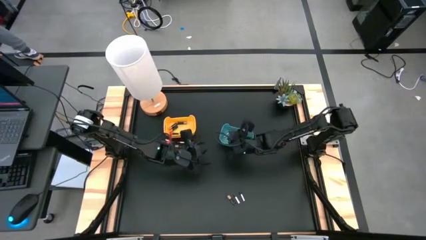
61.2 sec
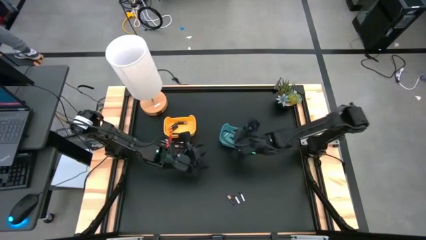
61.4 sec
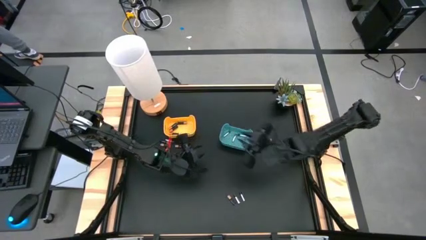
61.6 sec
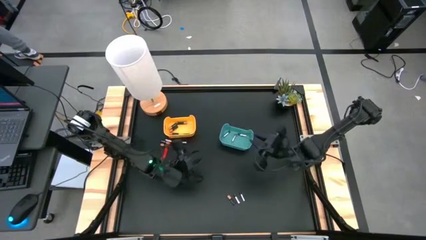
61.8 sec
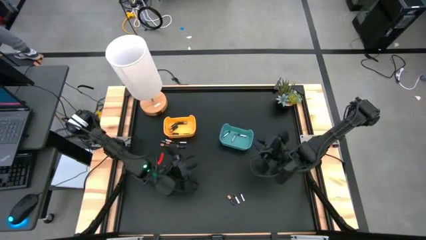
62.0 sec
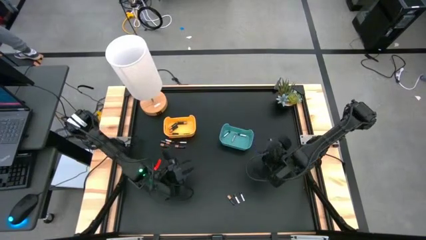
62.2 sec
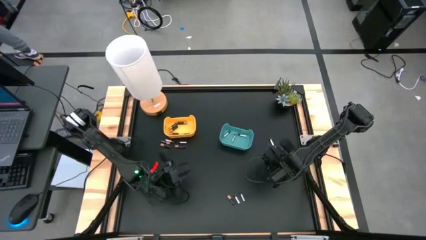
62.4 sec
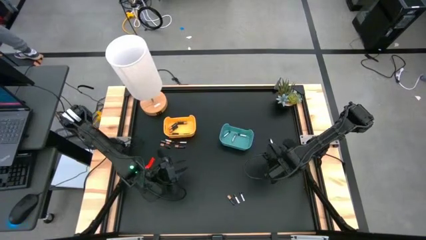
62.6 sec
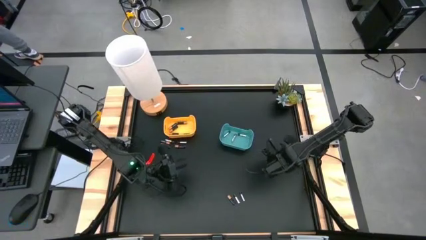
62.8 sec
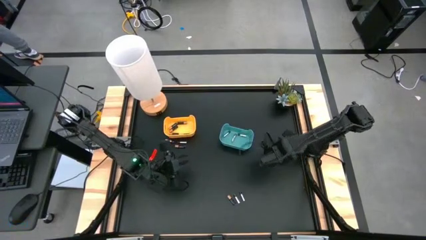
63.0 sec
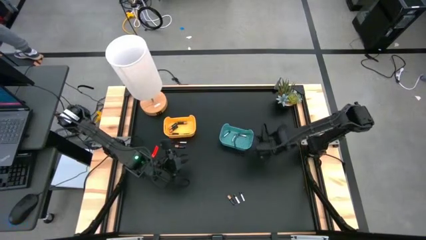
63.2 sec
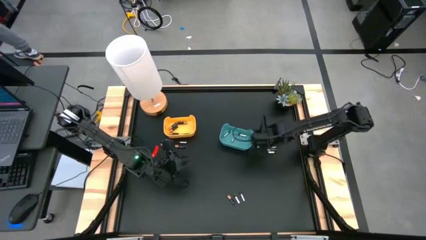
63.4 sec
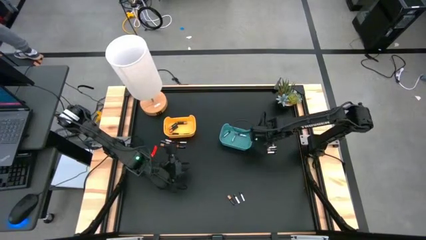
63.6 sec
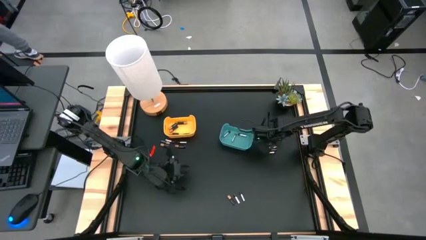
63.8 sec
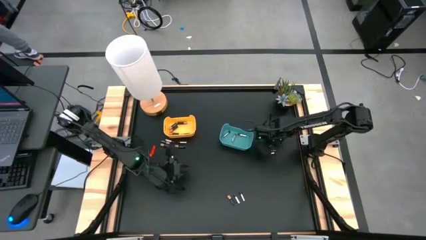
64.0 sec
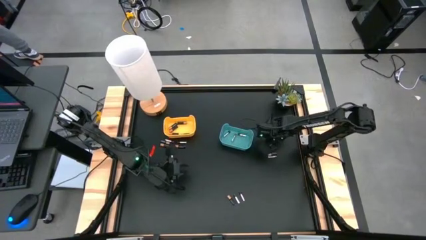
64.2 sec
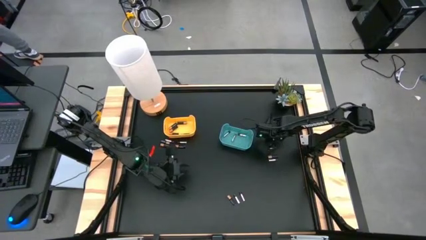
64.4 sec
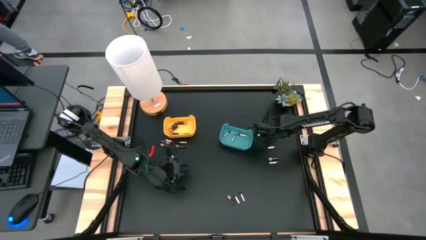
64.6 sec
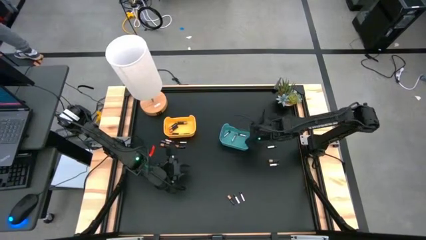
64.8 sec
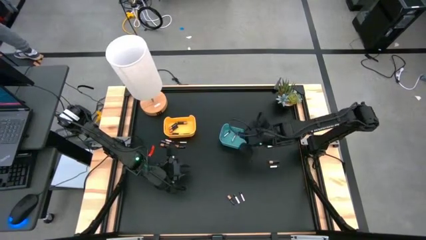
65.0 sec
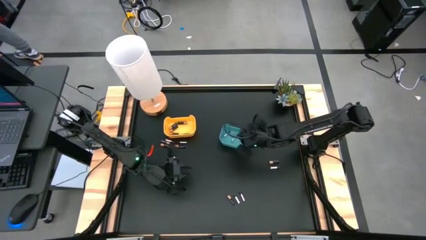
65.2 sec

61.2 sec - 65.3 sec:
Task: Sort batteries
Put the silver battery into the blue bin

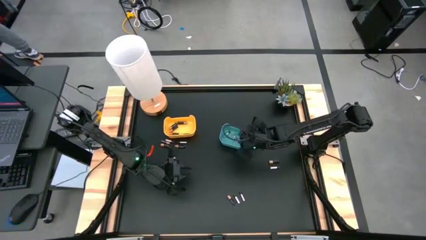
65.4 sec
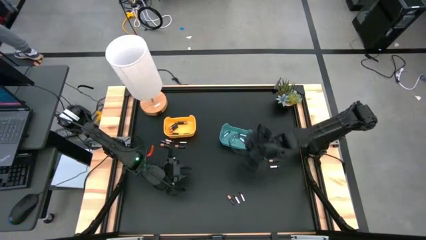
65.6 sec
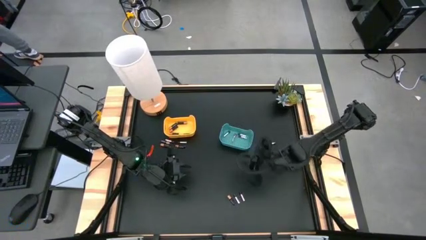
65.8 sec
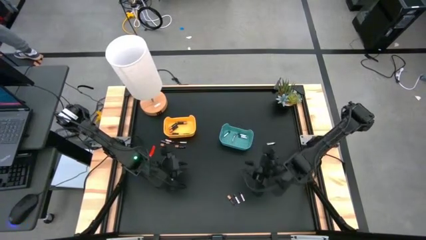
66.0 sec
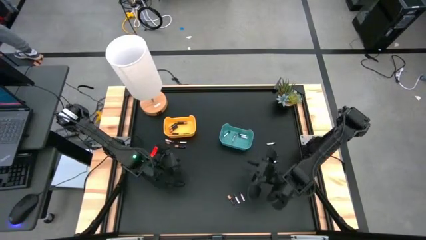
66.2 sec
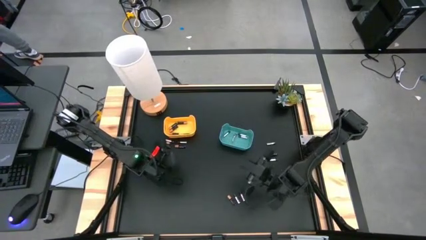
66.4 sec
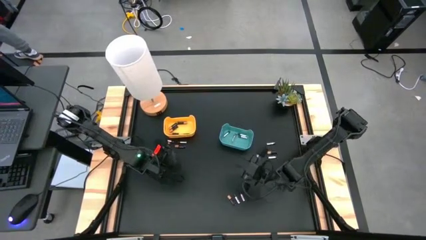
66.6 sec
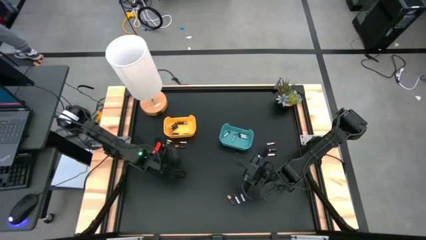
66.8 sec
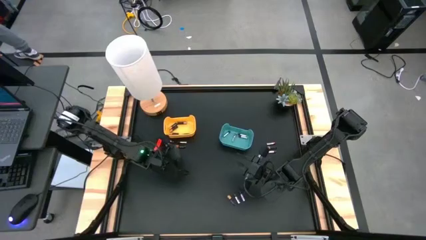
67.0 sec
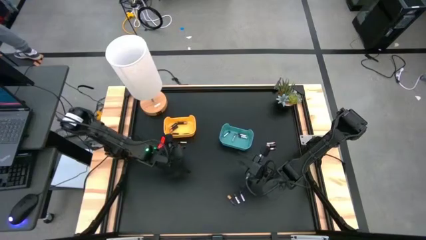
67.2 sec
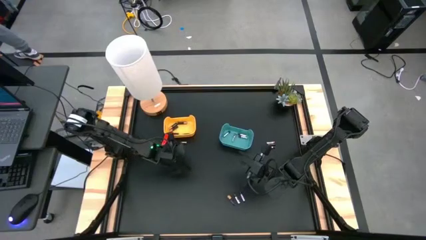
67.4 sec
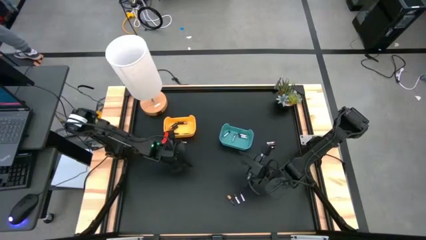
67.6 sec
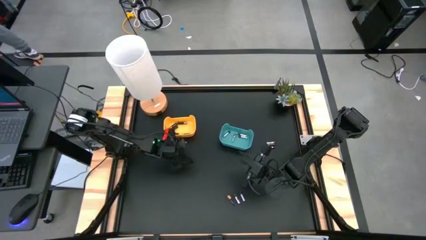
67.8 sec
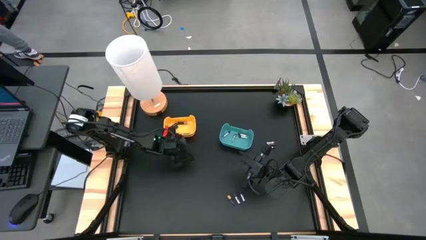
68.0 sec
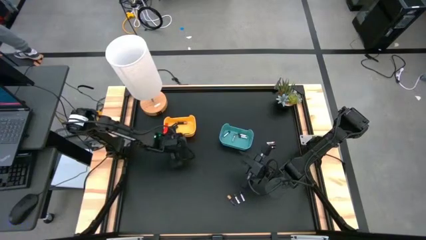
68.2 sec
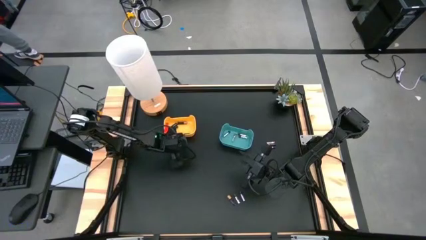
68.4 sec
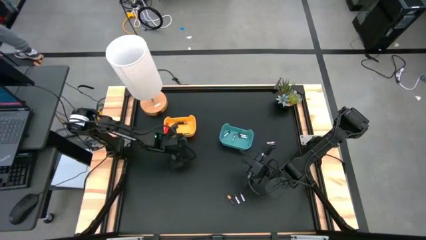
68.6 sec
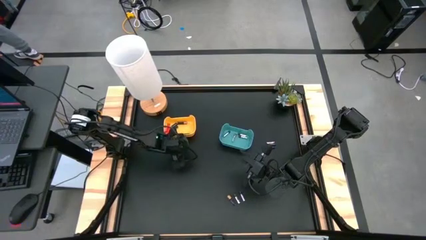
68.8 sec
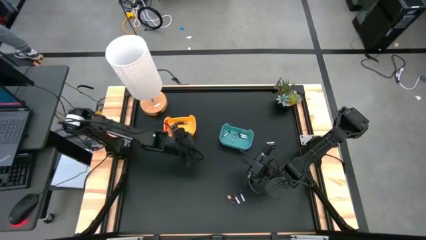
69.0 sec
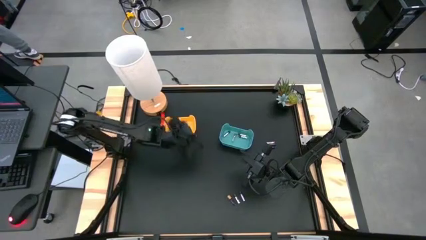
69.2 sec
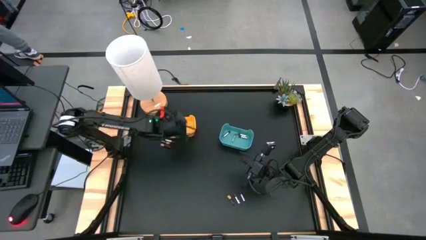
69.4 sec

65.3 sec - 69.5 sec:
Put the black battery into the yellow bin

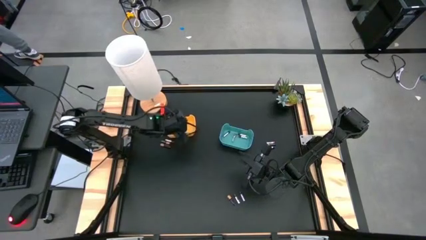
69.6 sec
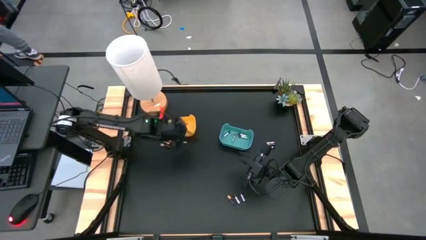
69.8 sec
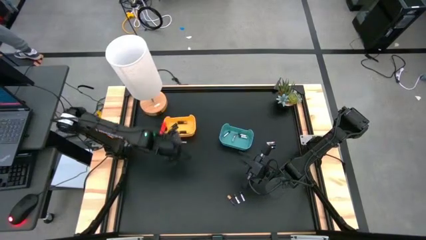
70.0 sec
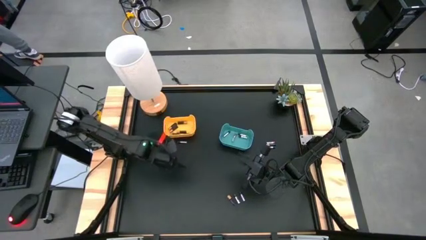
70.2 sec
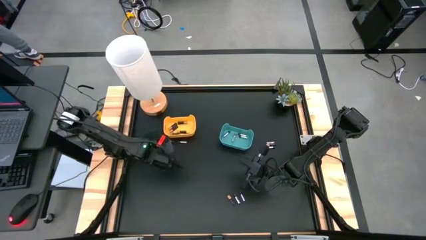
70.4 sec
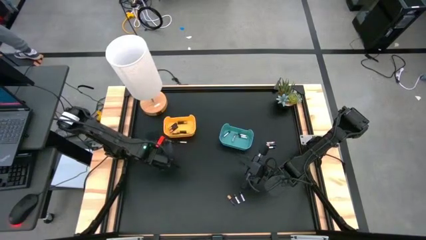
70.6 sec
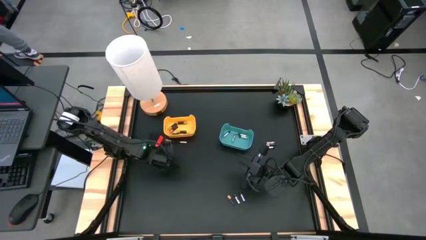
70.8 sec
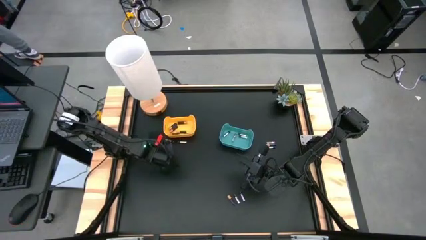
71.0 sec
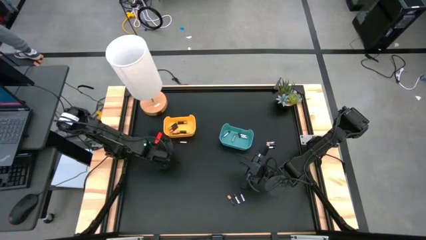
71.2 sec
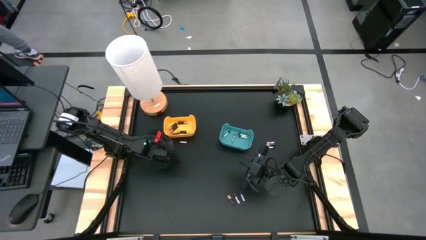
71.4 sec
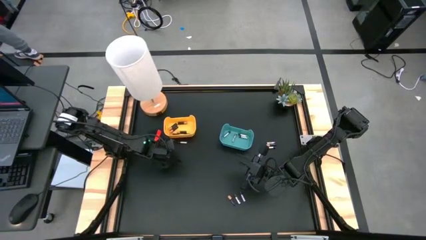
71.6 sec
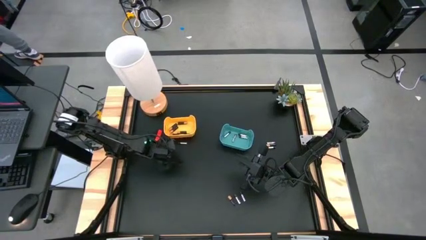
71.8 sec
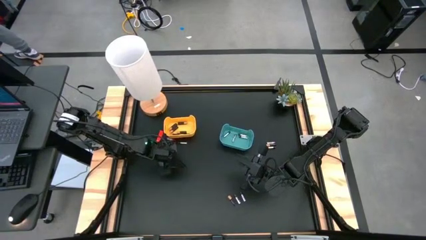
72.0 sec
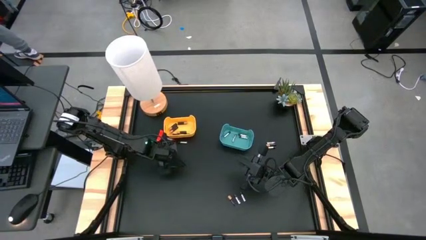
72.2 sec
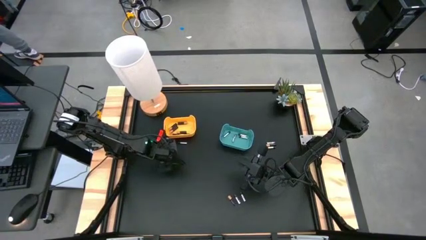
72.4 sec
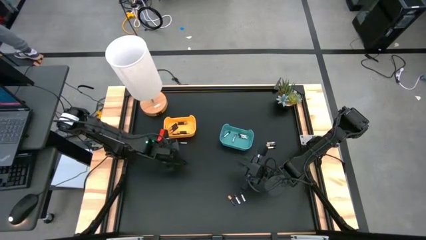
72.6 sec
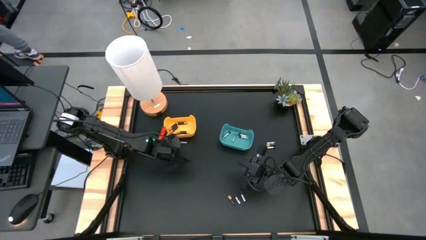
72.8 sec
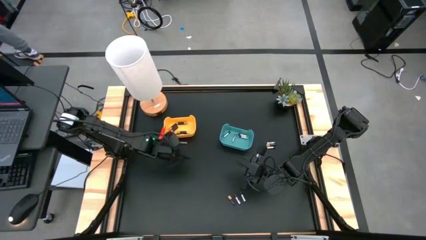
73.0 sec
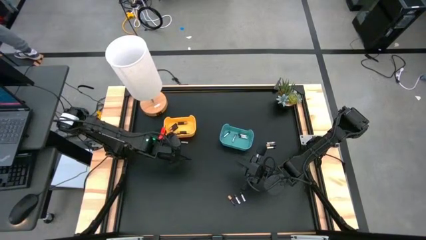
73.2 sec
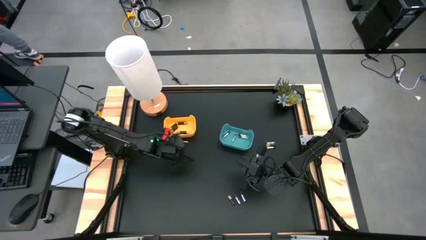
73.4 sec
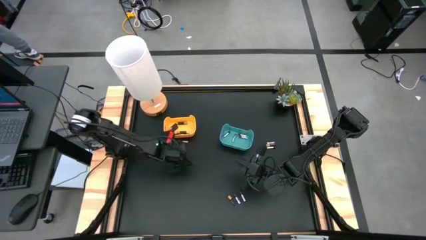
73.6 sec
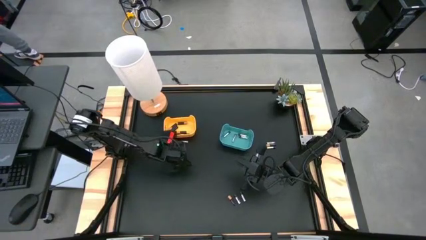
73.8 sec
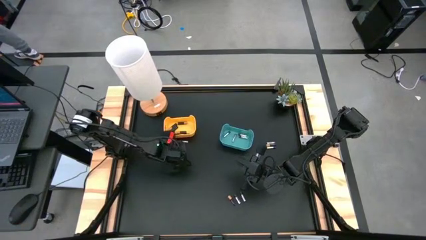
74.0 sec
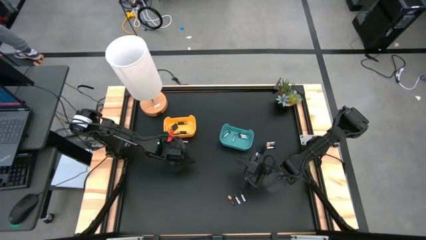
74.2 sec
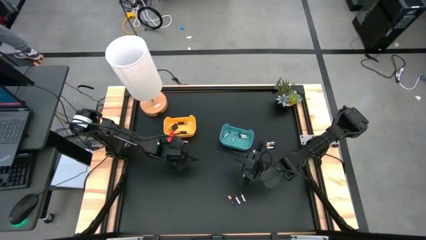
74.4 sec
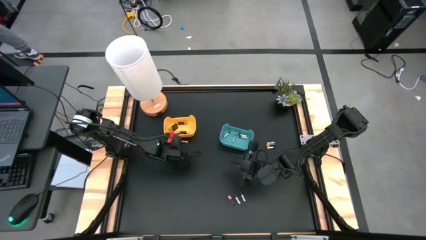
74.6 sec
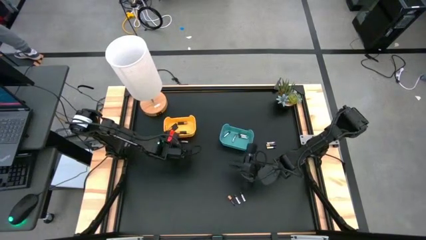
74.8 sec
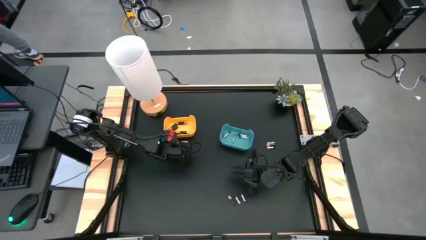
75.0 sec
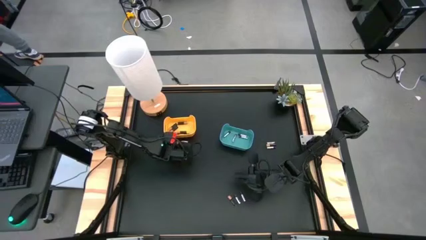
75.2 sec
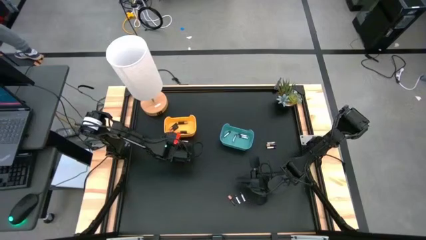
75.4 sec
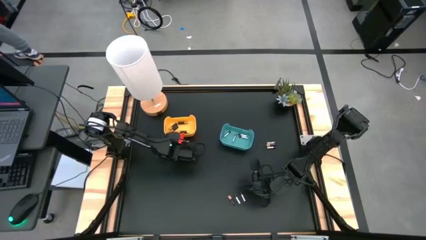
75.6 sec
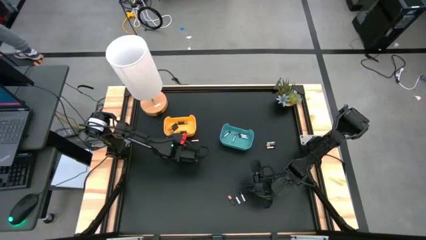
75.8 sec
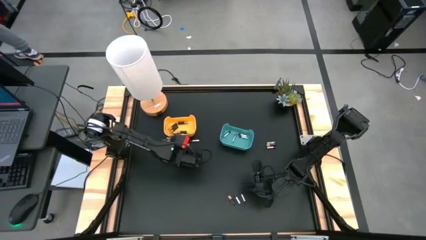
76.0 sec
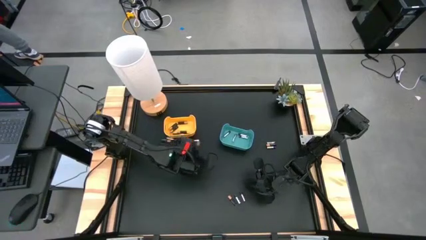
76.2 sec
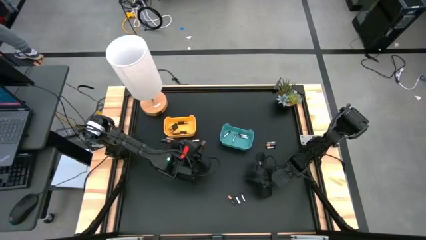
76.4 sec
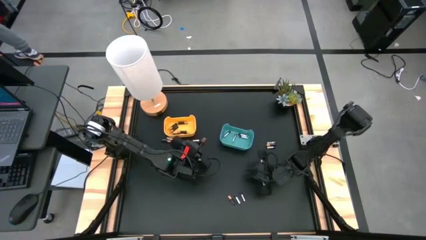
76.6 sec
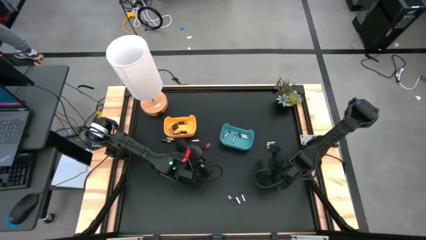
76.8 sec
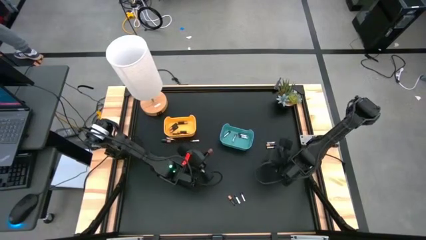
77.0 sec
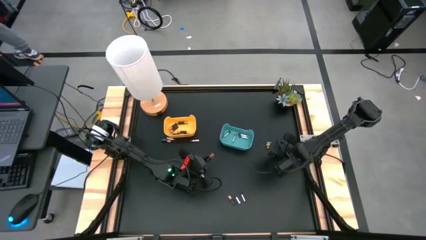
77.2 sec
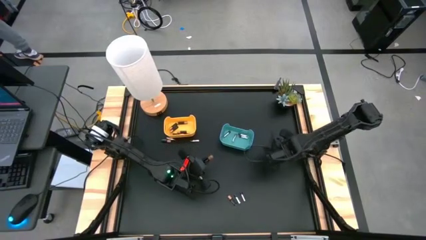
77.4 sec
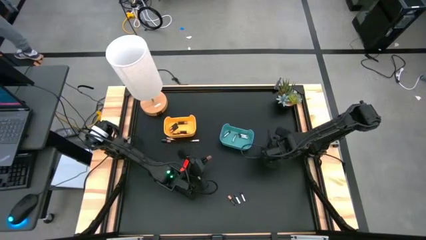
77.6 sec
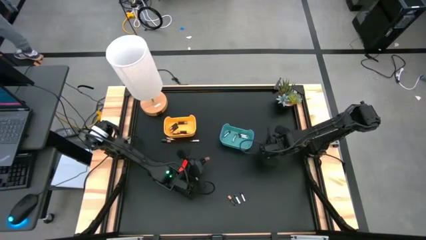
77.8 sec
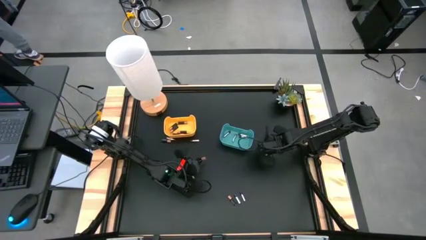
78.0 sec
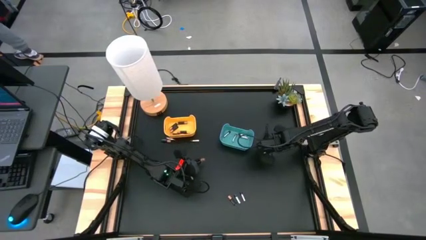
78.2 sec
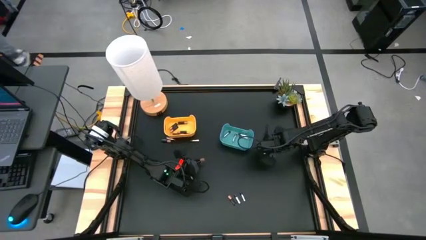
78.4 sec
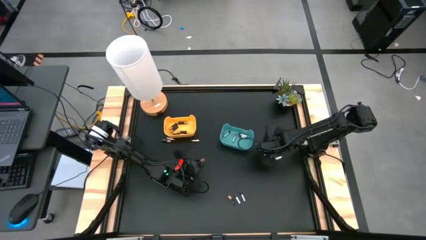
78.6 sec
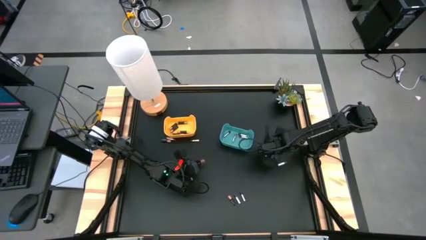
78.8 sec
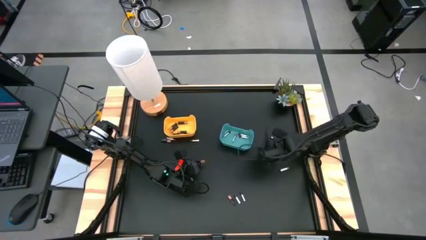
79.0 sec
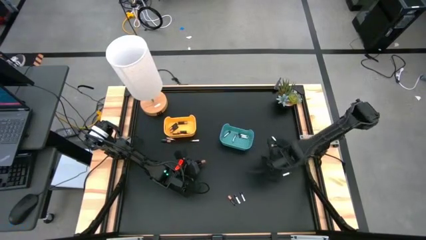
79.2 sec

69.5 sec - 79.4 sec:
Put the black battery into the yellow bin
